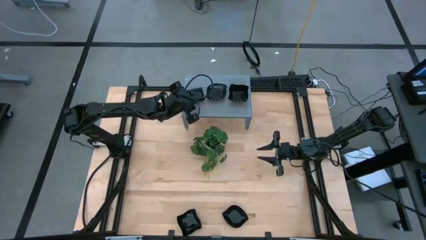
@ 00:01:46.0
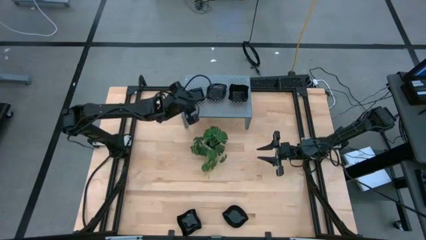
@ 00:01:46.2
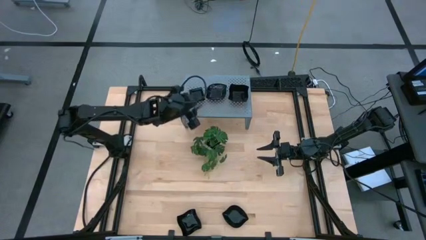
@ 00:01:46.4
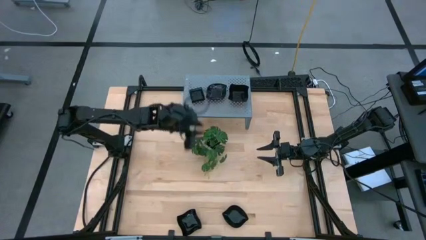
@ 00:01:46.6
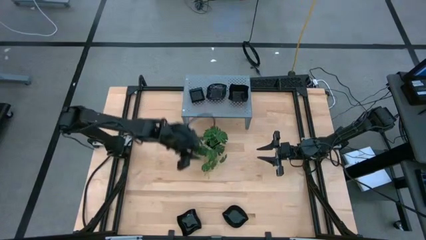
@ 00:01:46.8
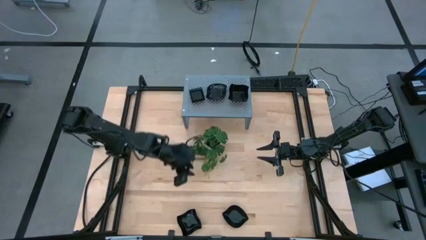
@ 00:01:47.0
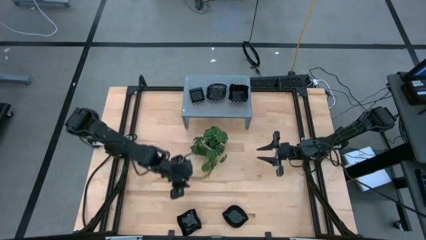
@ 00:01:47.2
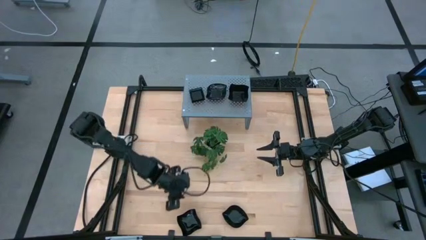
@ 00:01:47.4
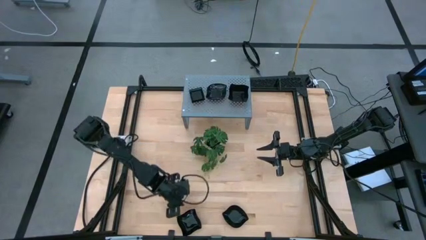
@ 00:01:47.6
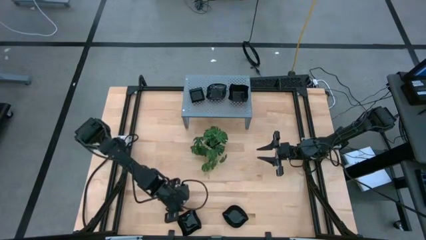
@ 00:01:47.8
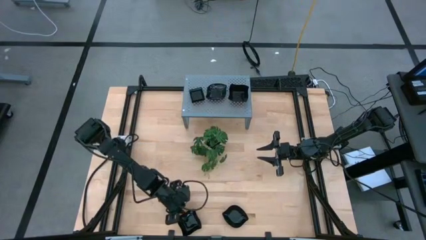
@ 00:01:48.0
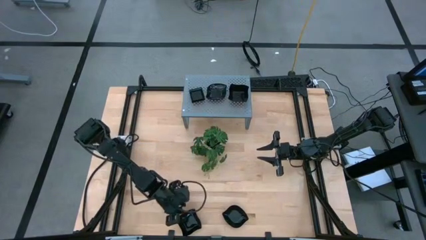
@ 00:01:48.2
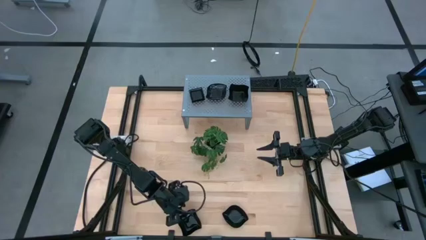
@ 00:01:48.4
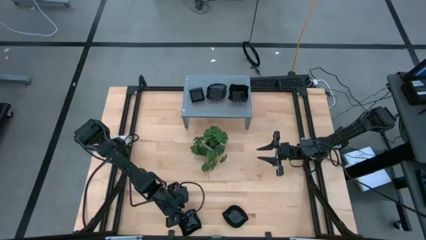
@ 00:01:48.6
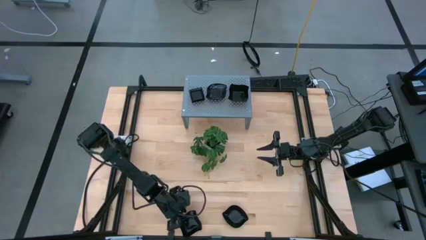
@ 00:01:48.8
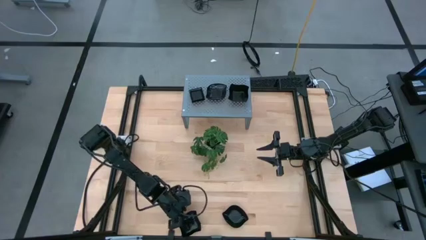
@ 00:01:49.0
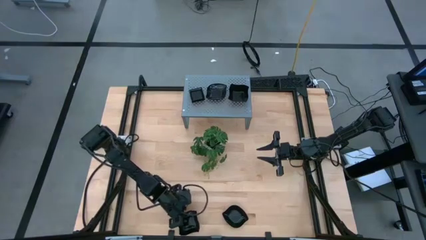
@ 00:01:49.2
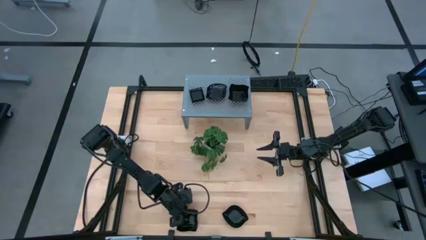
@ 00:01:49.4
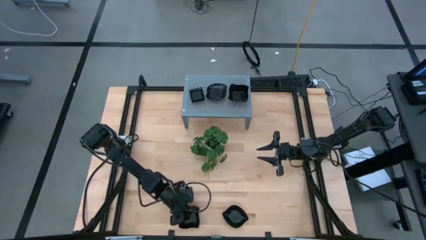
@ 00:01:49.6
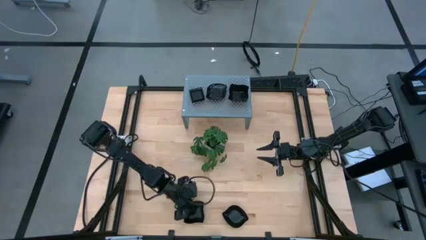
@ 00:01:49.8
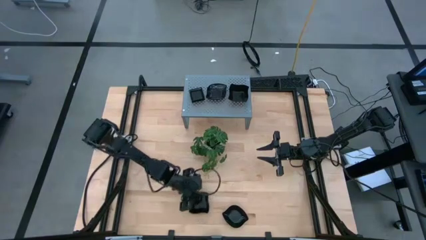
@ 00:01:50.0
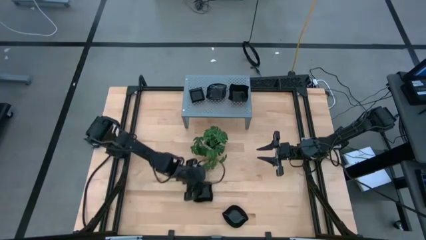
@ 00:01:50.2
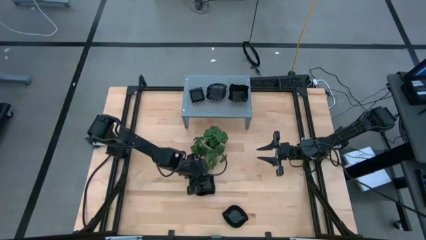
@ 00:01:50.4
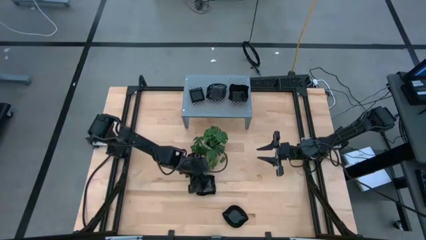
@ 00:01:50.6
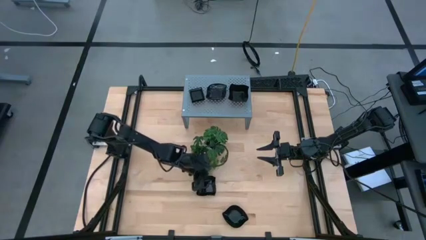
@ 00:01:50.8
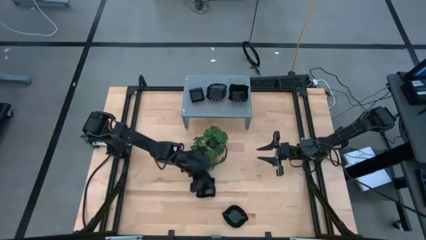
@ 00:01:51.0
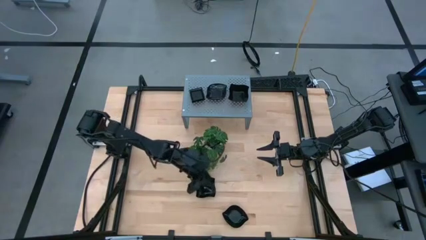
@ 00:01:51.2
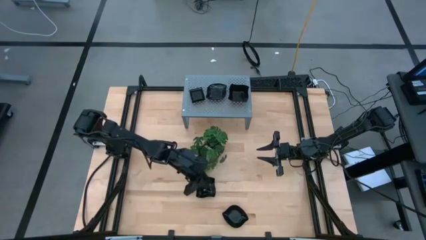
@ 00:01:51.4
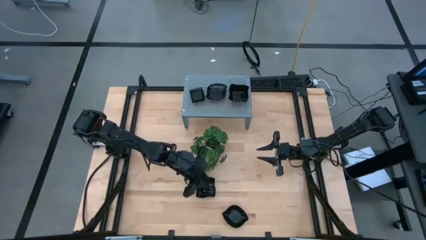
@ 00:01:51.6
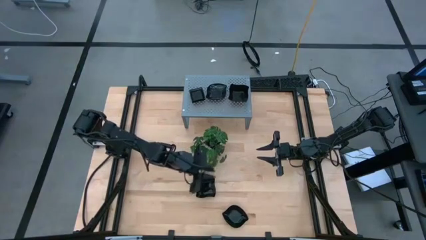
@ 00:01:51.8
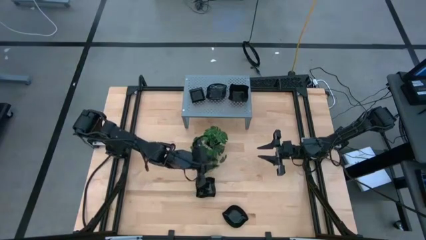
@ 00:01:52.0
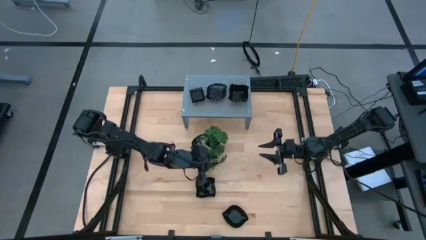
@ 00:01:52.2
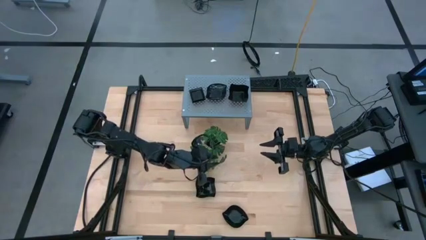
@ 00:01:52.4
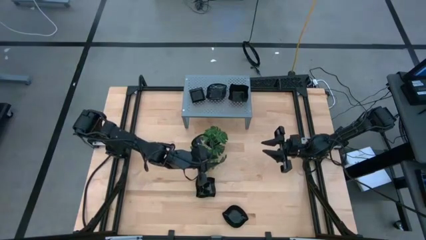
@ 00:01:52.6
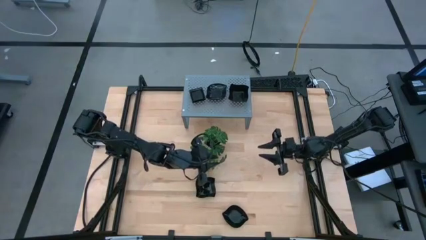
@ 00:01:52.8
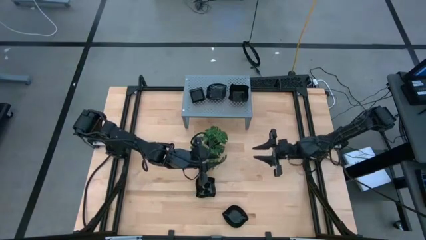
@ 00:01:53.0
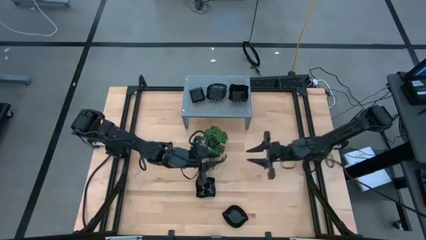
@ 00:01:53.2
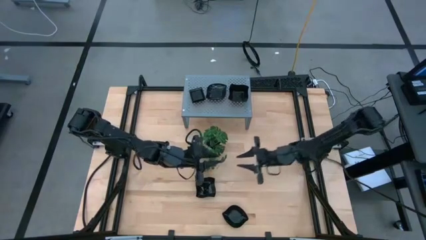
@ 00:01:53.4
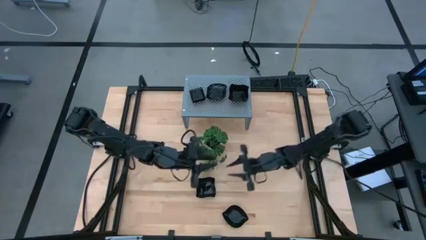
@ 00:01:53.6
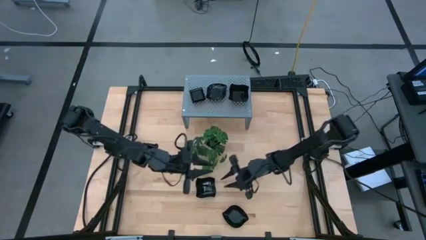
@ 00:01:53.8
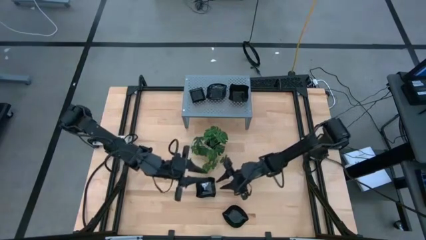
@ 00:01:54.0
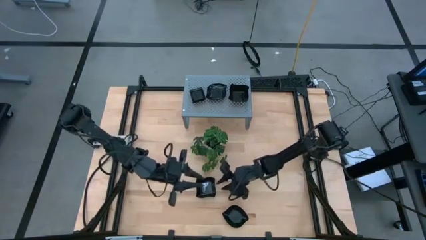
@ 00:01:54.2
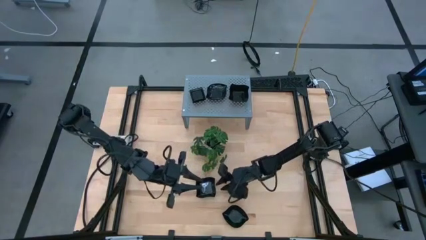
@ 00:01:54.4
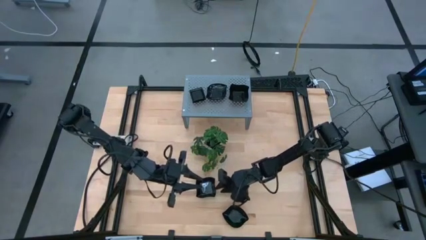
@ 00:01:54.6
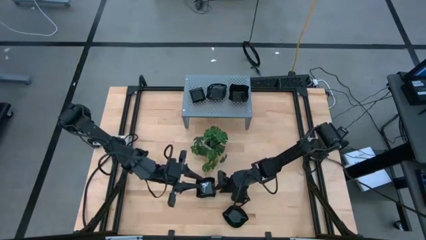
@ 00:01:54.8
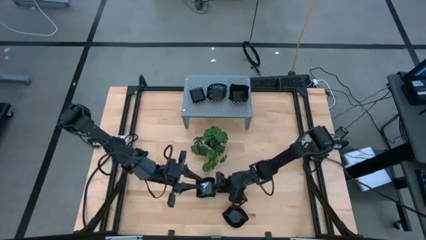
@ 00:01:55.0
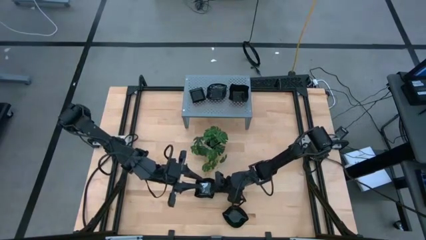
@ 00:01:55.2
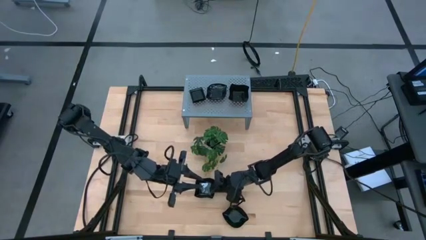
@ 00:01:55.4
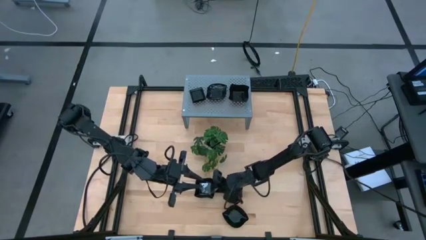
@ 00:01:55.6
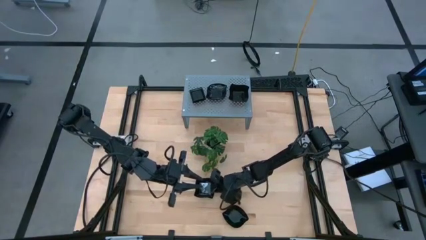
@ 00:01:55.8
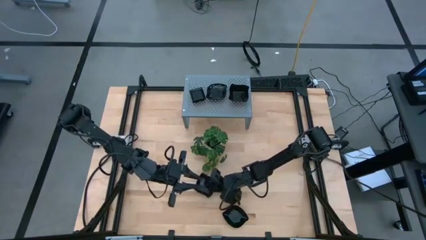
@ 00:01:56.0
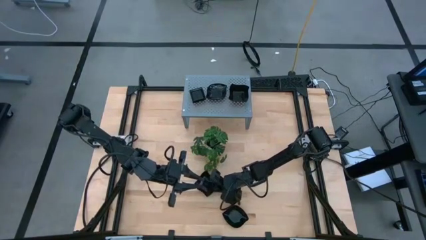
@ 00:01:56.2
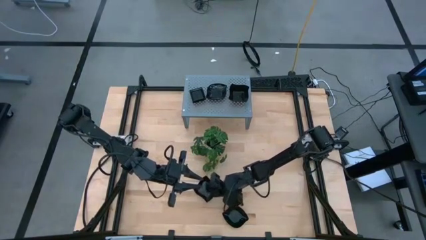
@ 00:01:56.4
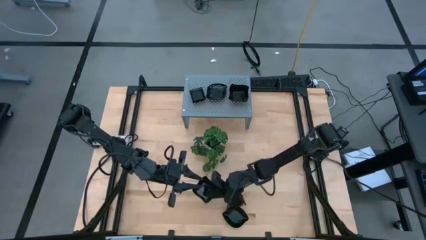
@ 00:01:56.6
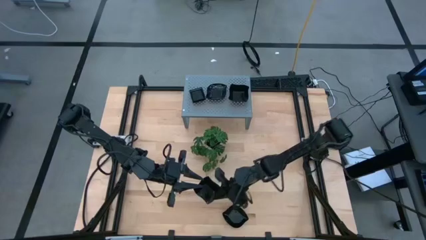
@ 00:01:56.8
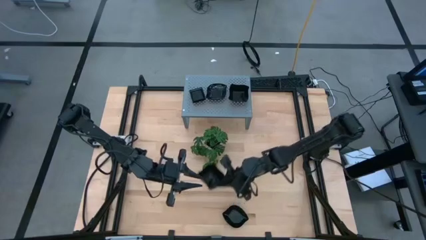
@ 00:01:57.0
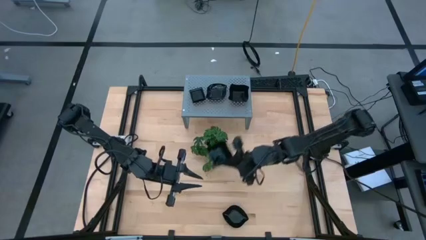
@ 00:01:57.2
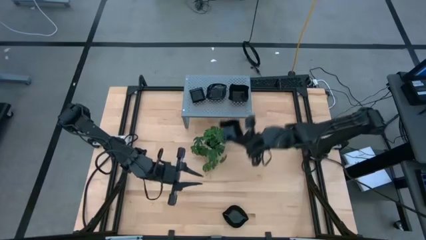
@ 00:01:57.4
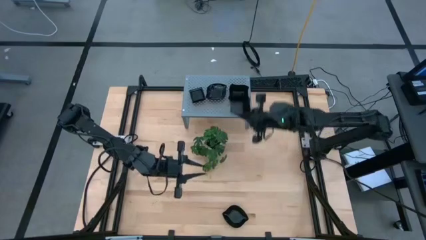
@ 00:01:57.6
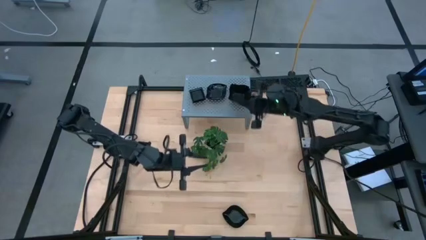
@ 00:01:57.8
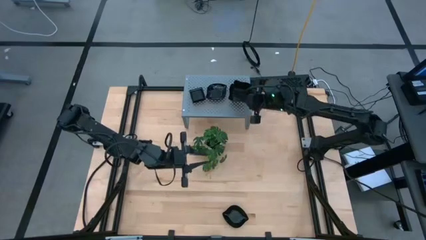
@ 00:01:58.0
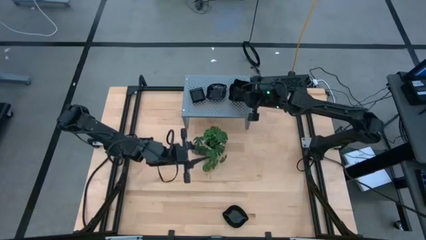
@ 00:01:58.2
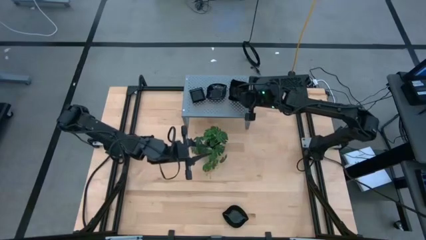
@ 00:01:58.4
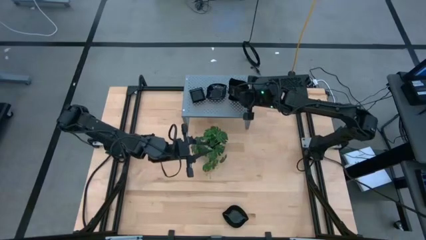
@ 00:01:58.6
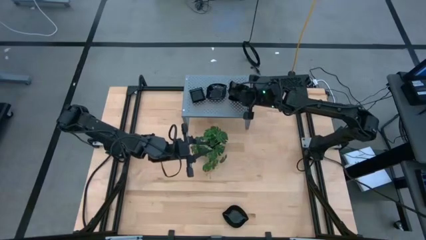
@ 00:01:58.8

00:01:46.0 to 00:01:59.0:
Task: Pick & Place Mini shaped plates
Stack the black distorted square plate on top of the other black distorted square plate on the shelf

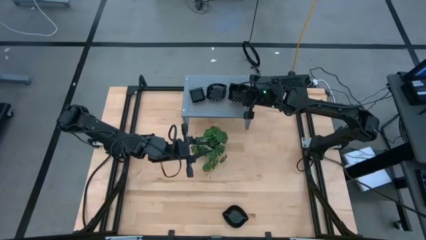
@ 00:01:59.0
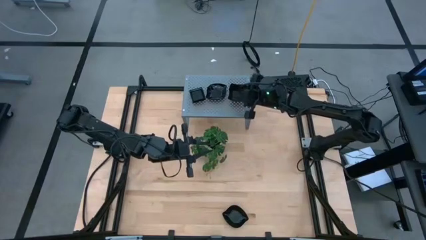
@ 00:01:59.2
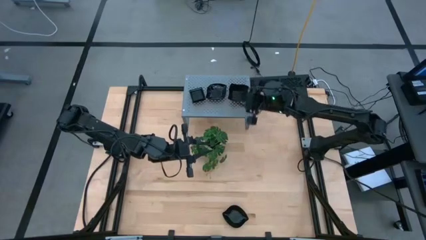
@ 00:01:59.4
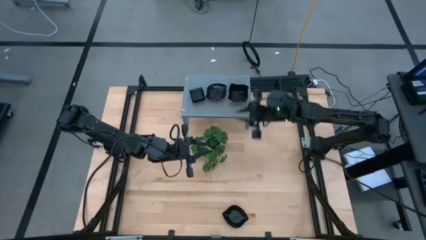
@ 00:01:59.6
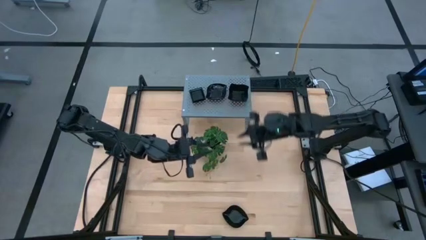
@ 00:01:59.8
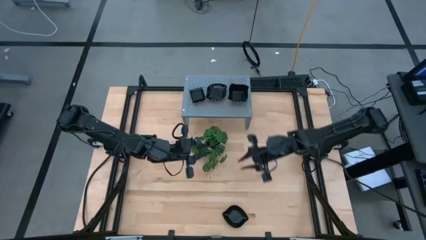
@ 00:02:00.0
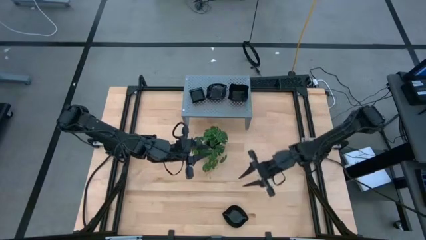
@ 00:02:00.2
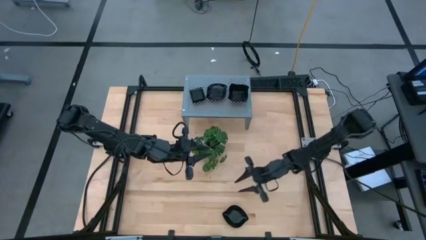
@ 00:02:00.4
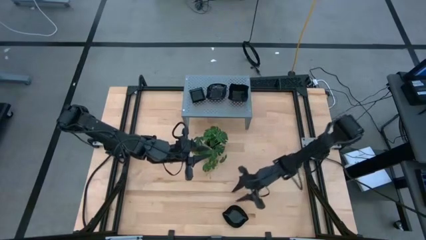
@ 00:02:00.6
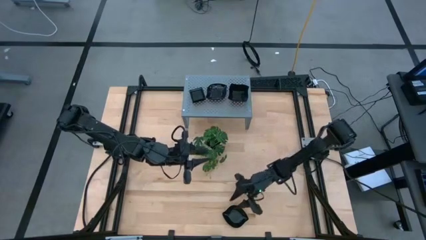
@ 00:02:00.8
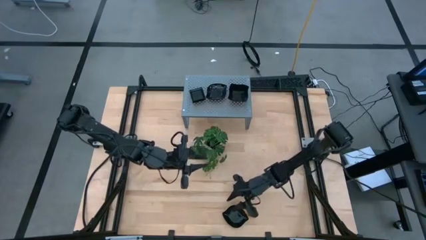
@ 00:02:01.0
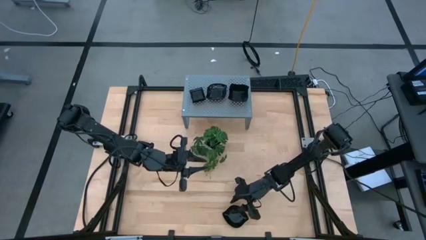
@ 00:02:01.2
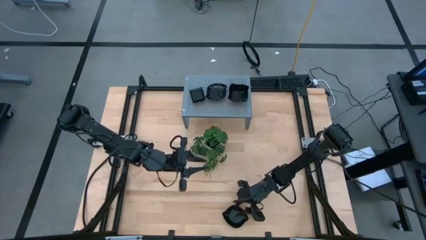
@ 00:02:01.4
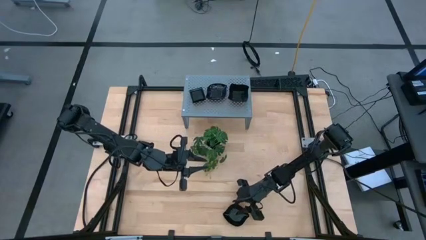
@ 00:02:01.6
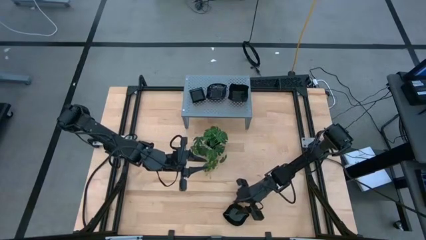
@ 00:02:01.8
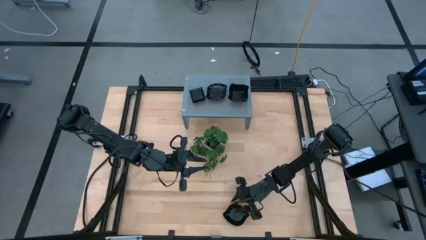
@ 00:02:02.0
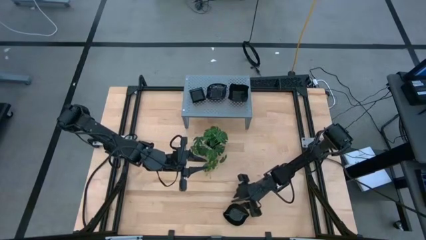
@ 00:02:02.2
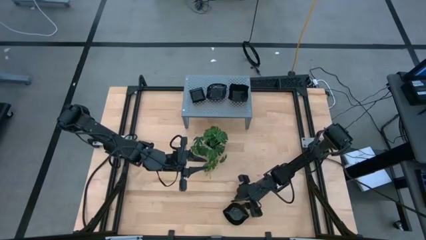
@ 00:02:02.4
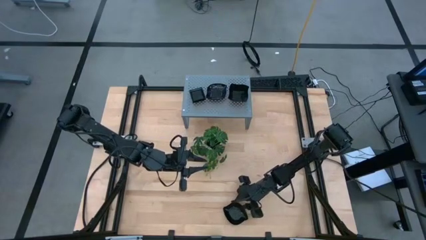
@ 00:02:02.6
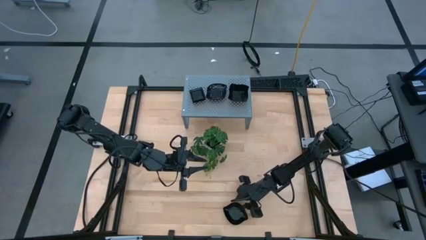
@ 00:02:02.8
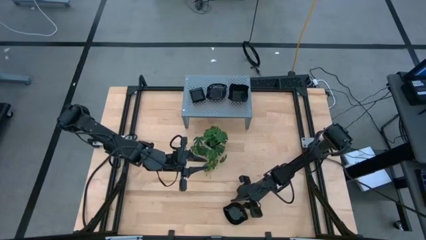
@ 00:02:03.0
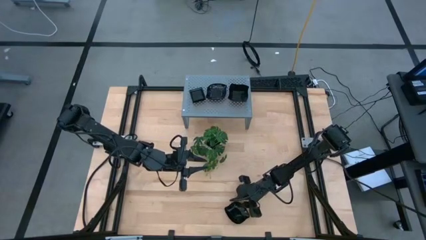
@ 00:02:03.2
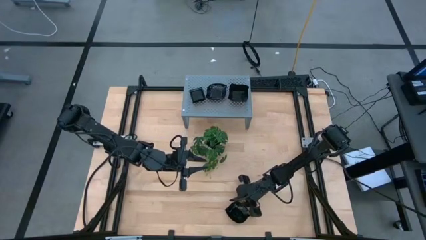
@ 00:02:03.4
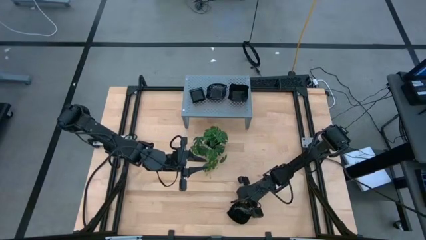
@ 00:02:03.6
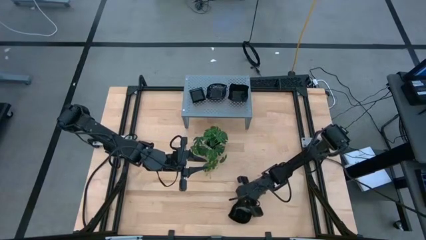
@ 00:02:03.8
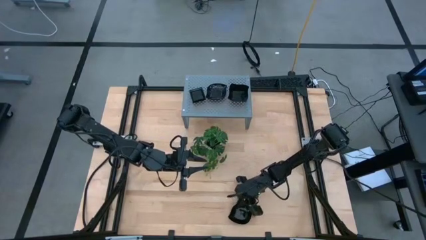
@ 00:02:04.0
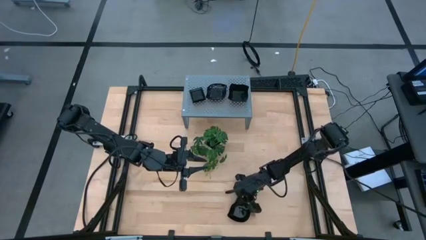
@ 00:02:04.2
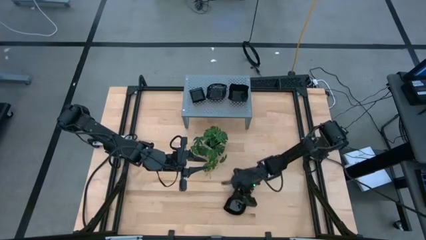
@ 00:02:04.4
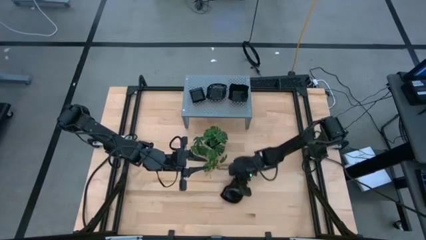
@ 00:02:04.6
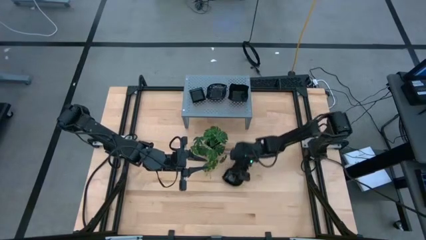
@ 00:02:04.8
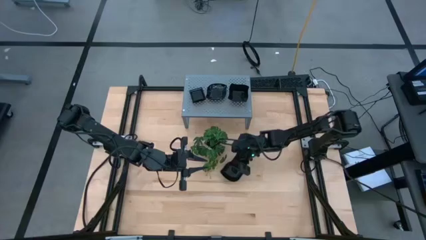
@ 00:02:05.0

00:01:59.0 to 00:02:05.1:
Stack the black leaf shaped plate on top of the other black leaf shaped plate on the shelf
